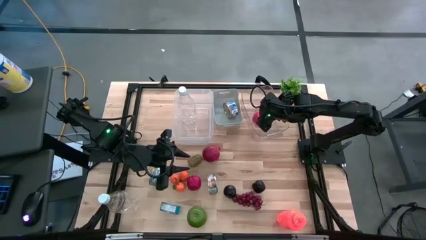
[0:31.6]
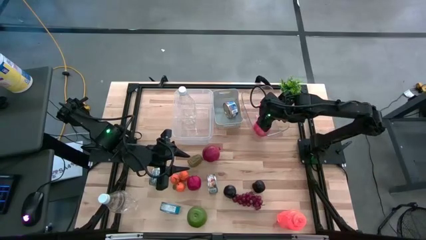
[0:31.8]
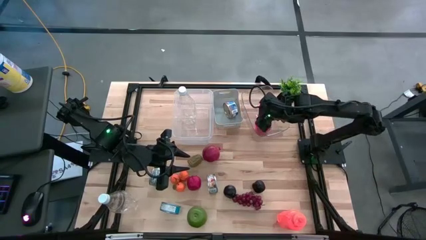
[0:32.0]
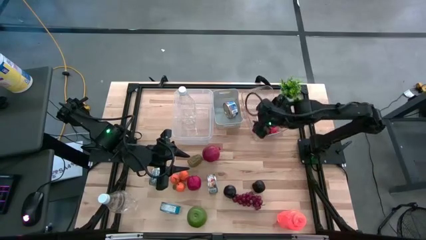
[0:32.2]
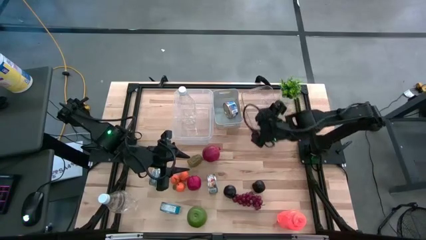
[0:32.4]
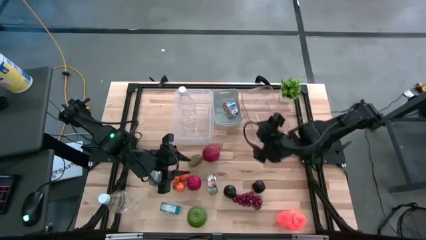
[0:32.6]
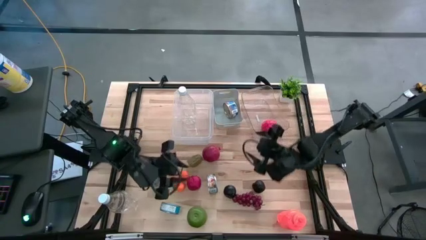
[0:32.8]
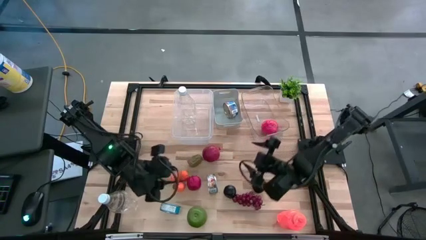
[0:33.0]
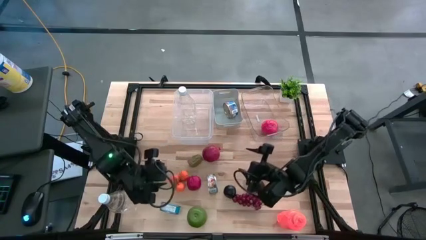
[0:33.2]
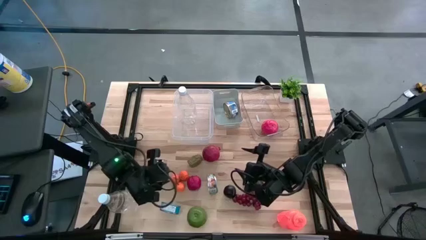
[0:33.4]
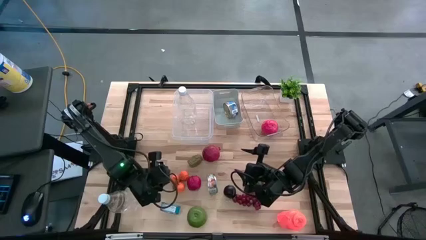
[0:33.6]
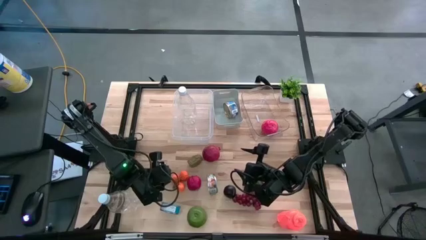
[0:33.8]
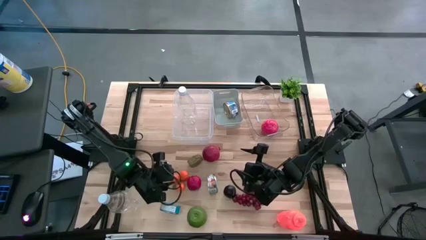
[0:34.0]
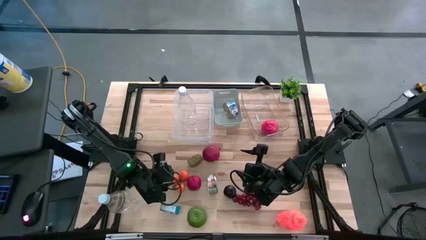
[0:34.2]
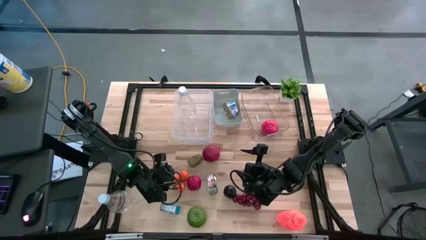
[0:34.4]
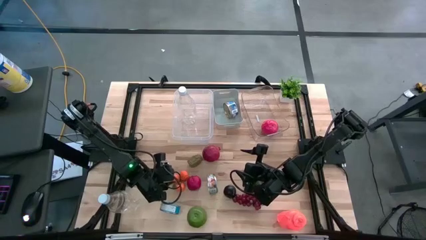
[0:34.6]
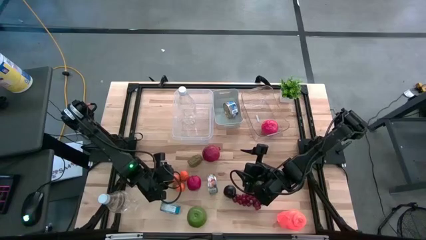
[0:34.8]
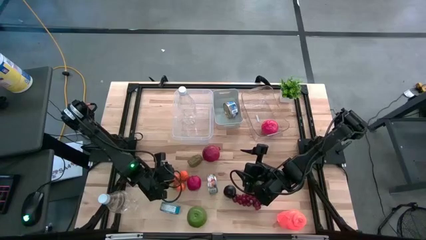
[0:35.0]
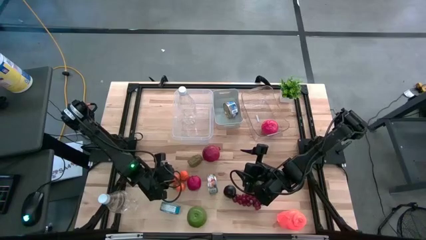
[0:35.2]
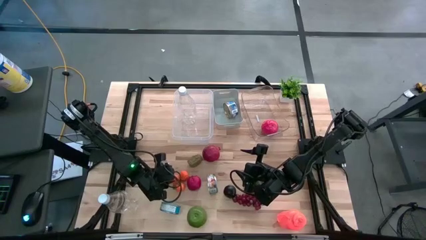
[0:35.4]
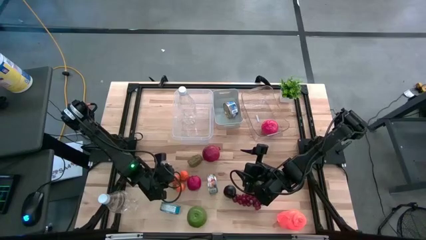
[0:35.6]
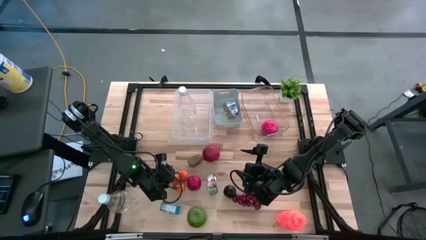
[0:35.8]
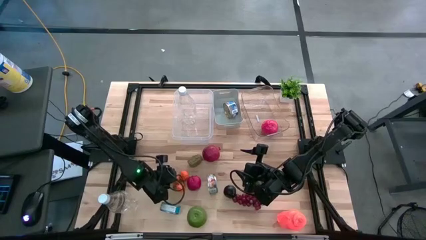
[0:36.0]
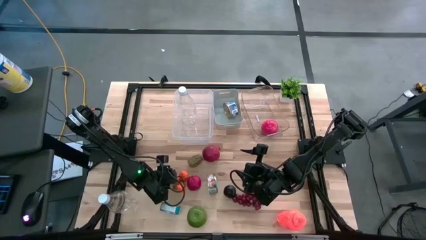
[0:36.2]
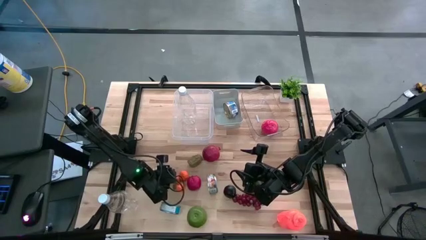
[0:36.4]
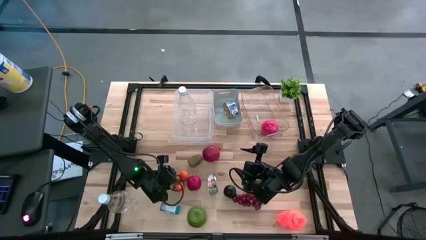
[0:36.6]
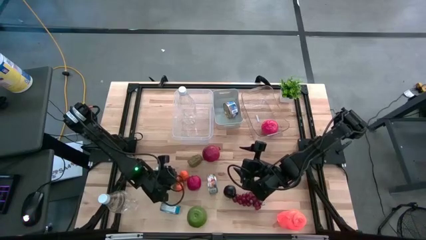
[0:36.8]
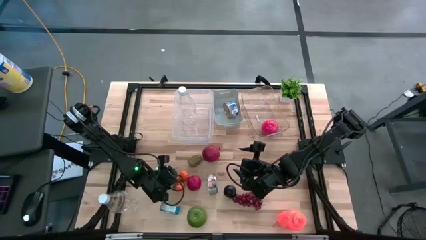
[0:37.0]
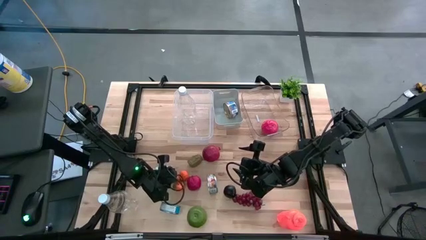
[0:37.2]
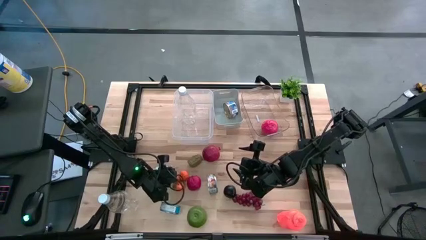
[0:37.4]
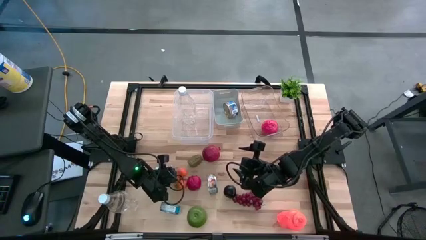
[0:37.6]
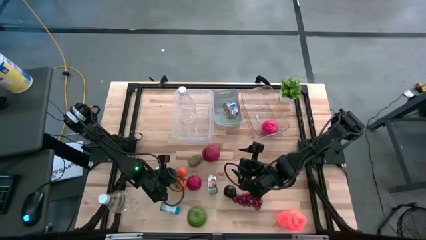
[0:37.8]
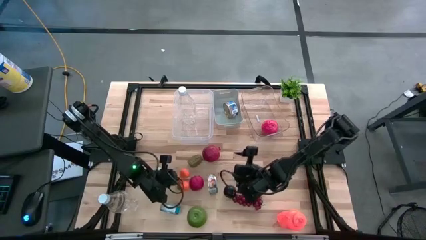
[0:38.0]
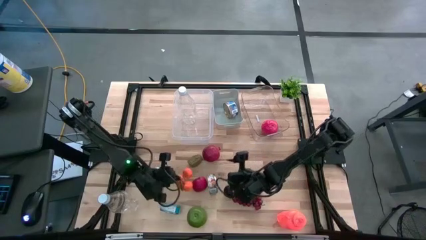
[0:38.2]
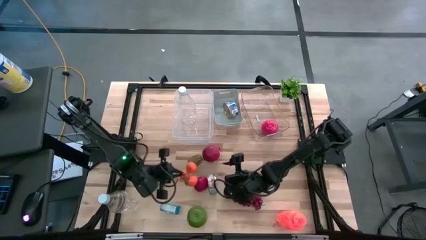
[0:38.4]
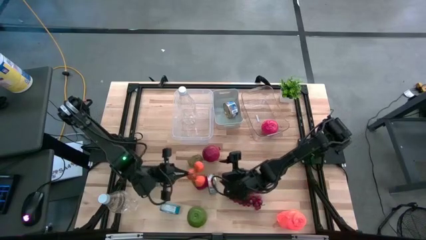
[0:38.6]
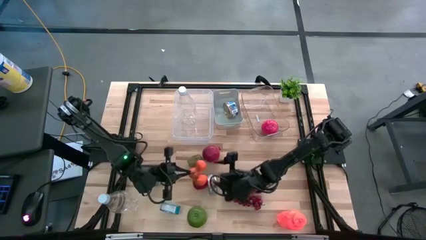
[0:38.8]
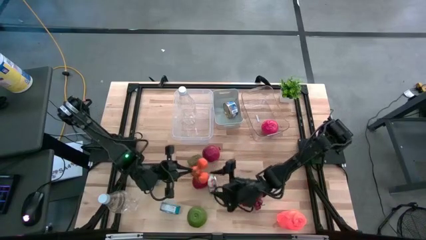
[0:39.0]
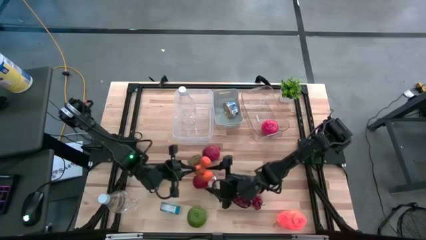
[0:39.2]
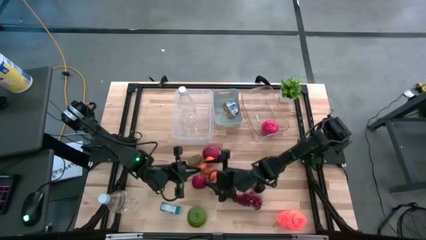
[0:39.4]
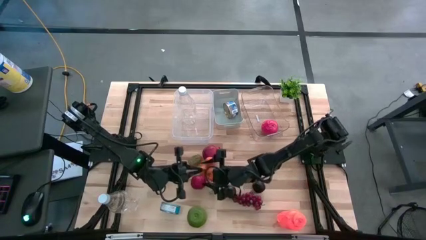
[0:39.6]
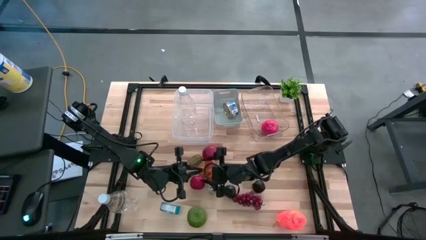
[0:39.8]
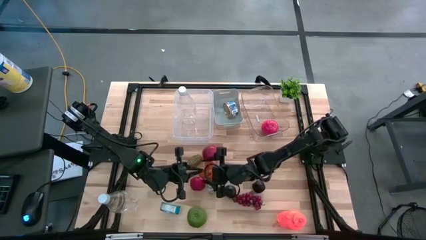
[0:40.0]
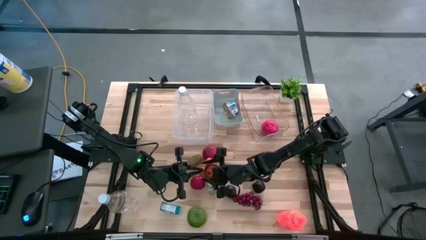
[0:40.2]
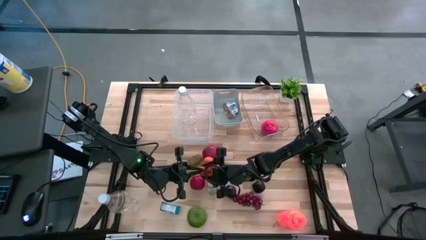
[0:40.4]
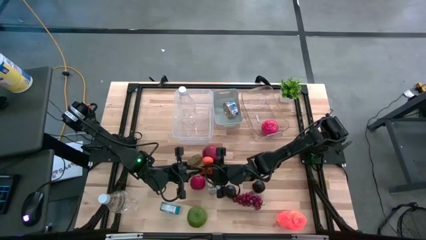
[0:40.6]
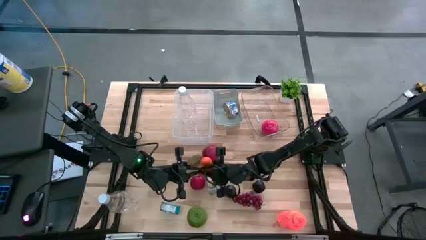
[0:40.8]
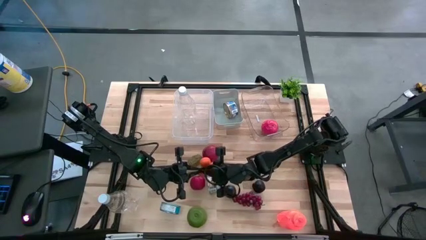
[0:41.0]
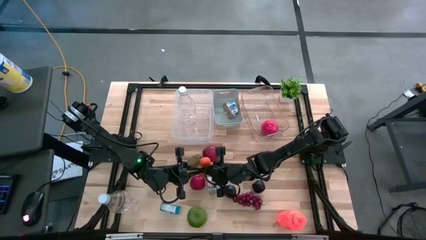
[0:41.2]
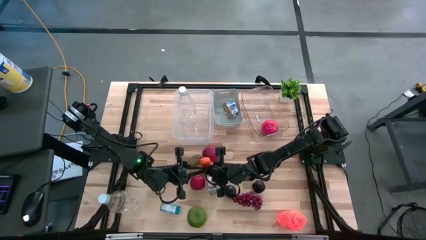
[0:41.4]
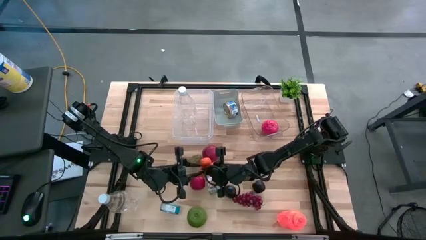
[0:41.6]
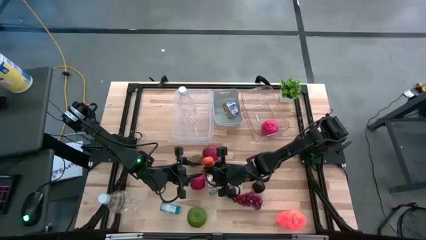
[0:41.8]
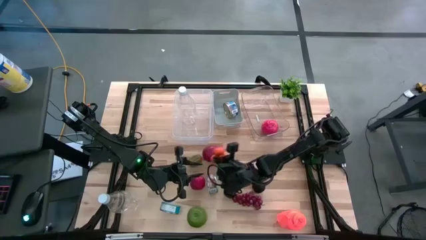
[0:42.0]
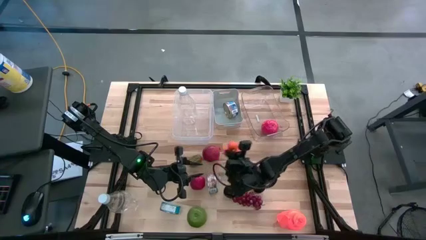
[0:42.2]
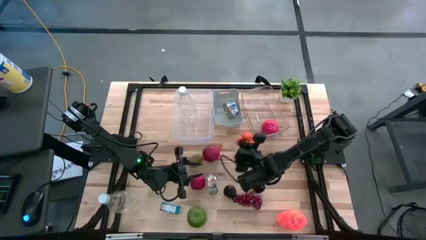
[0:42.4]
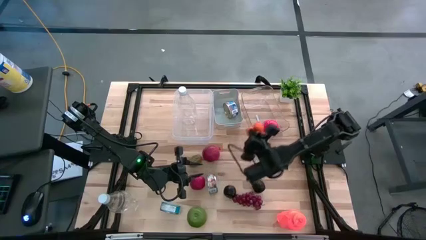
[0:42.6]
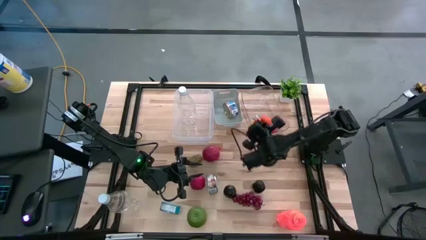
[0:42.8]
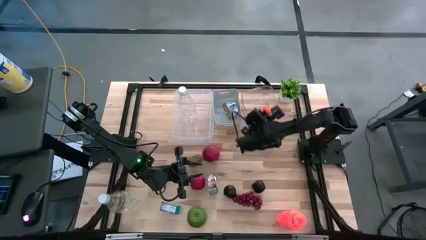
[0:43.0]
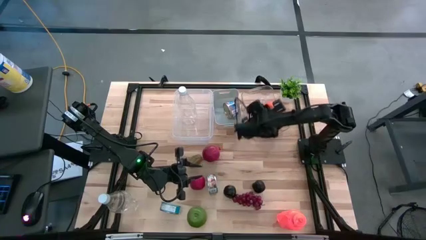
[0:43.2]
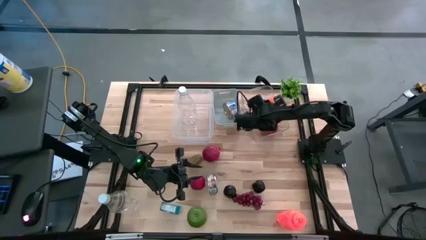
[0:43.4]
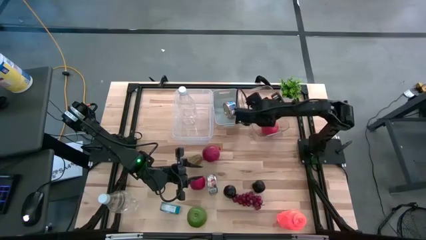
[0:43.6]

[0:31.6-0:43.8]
Task: Pick & Place Food Item
Put the tangerine into the right transparent bin
